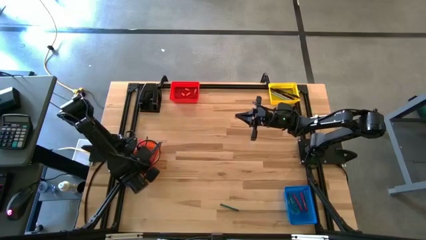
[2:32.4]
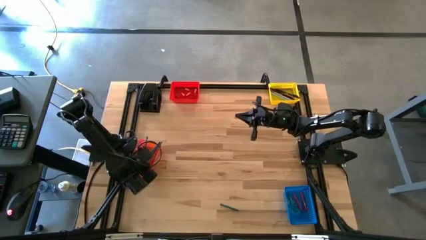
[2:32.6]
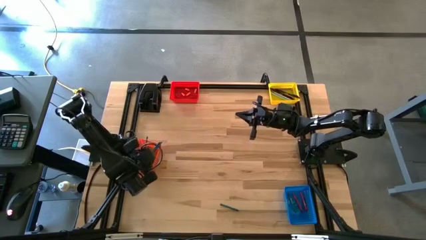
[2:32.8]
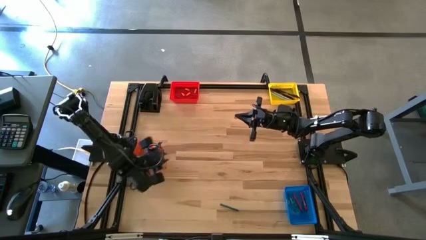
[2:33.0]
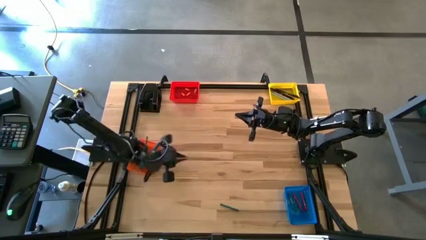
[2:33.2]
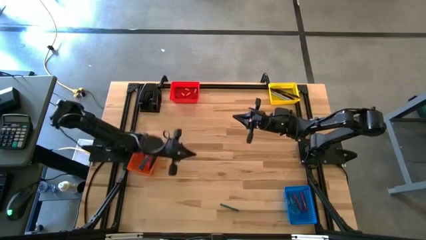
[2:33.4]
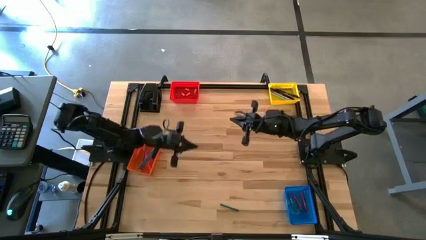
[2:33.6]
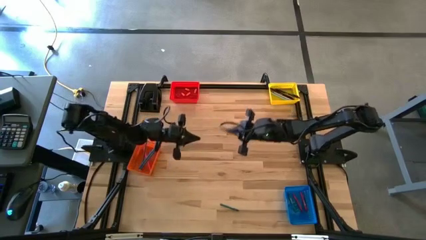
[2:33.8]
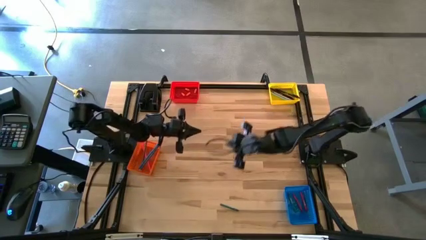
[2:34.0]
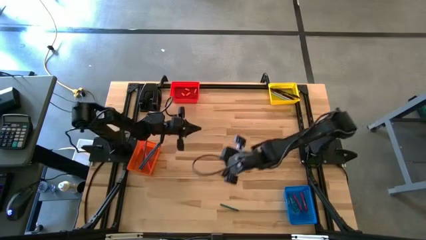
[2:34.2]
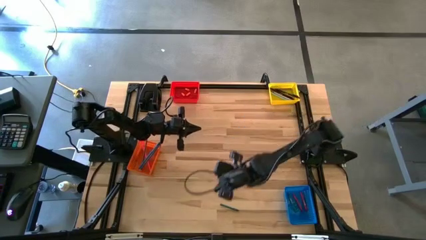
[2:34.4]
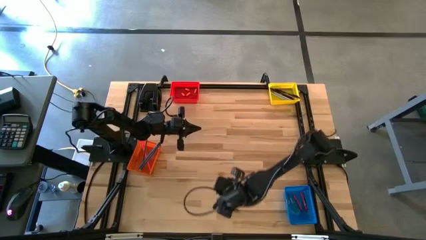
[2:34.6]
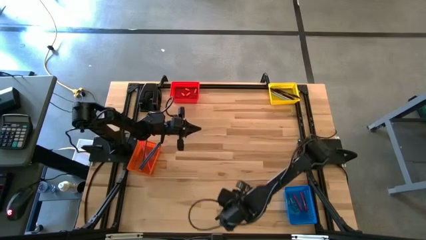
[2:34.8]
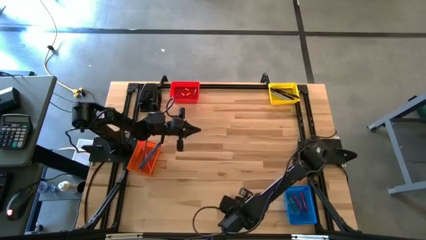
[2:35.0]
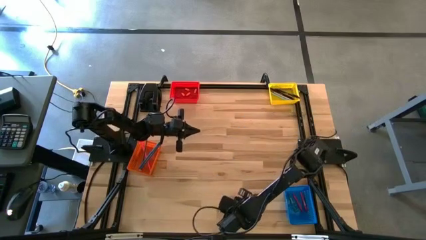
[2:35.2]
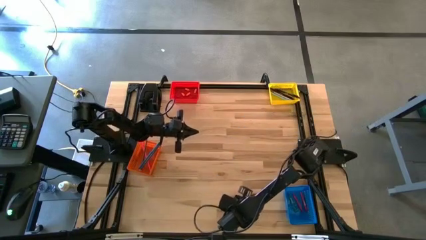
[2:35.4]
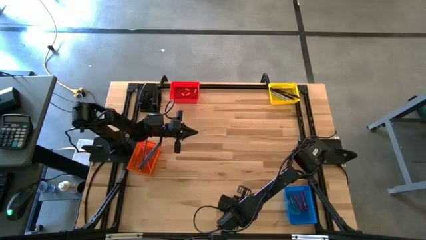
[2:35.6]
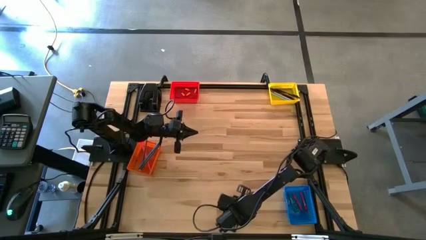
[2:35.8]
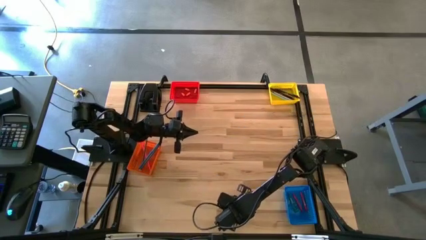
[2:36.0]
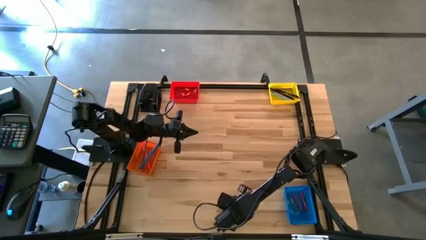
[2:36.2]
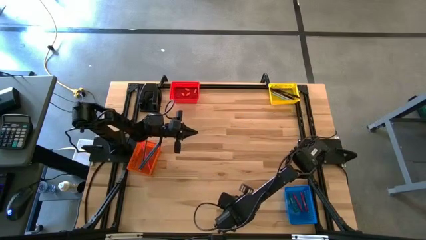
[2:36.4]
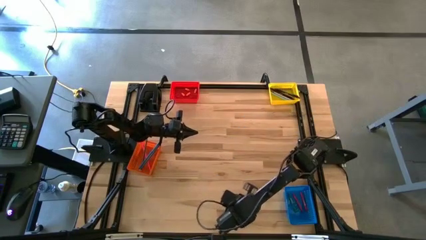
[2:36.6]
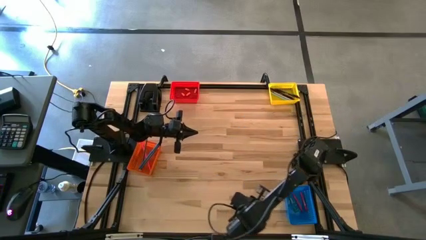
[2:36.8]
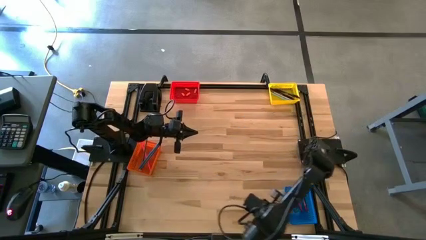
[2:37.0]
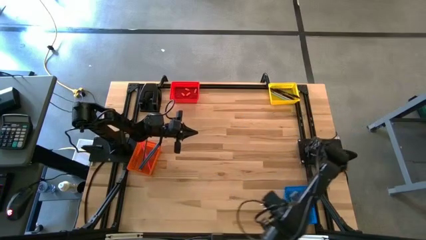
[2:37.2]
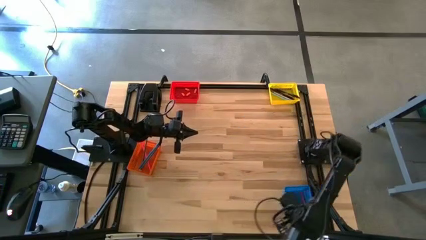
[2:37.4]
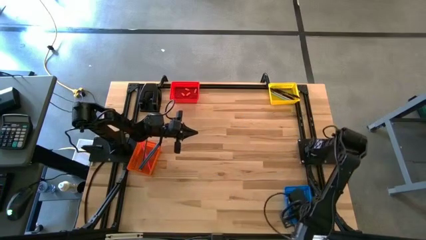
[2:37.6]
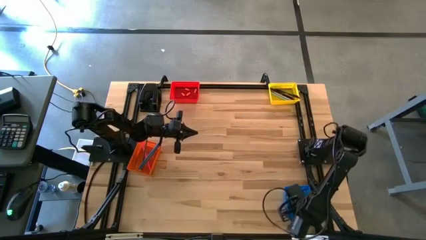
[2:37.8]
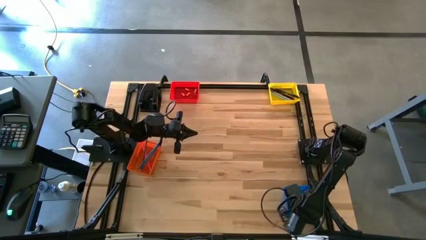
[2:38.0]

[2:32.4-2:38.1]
Task: Sort crayons/erasers/pens/pencils in bins
Put the green crayon into the blue basket

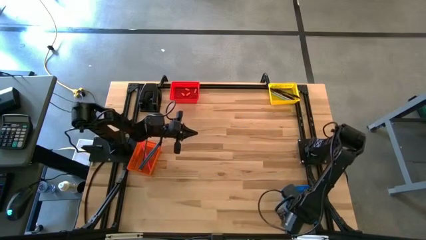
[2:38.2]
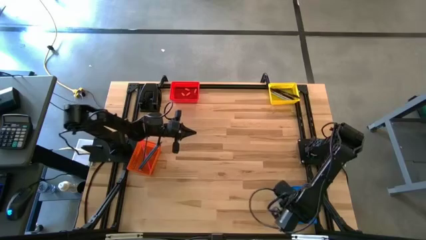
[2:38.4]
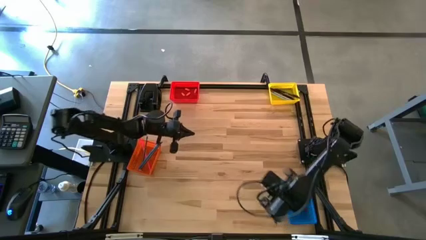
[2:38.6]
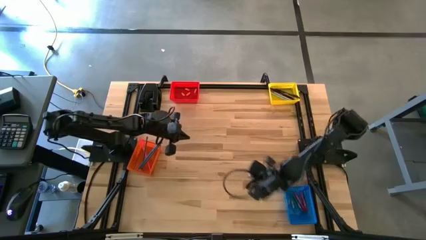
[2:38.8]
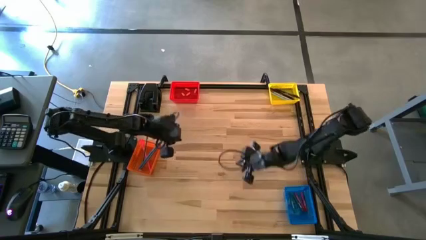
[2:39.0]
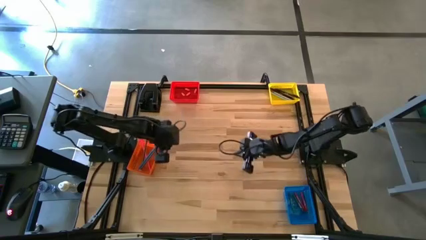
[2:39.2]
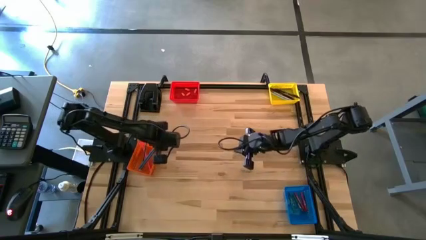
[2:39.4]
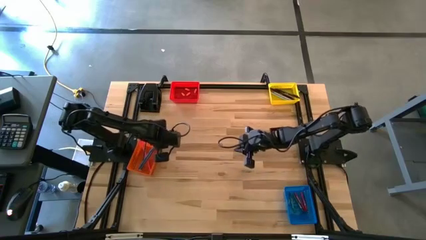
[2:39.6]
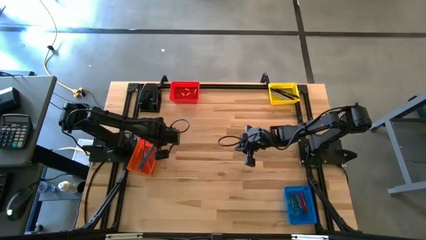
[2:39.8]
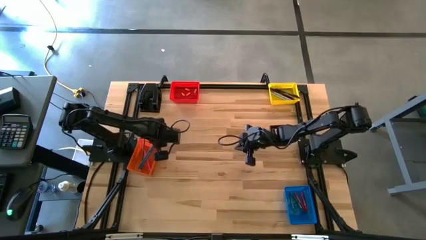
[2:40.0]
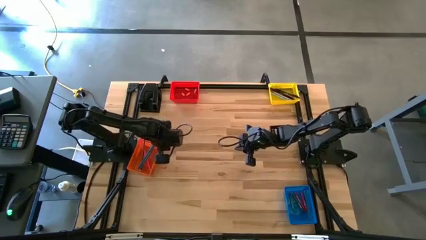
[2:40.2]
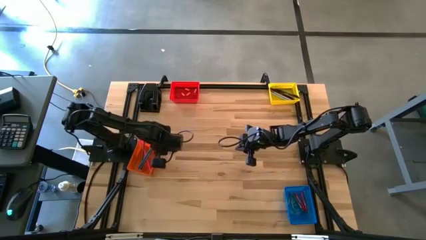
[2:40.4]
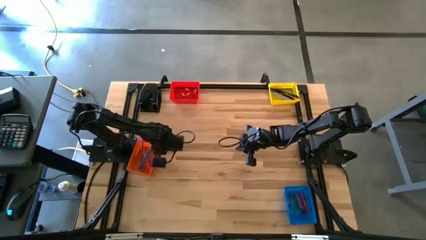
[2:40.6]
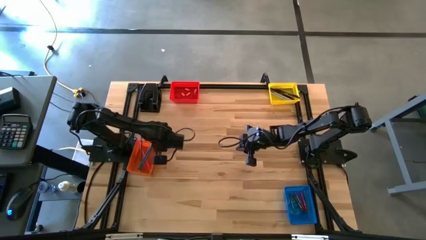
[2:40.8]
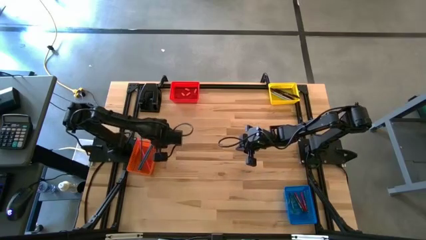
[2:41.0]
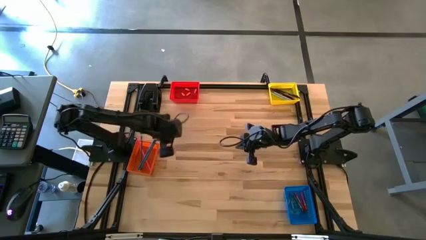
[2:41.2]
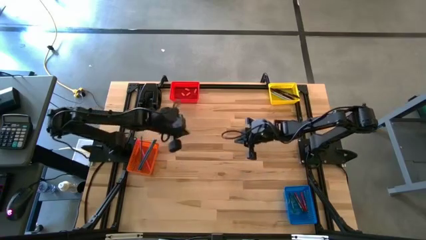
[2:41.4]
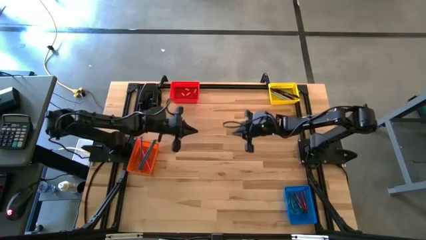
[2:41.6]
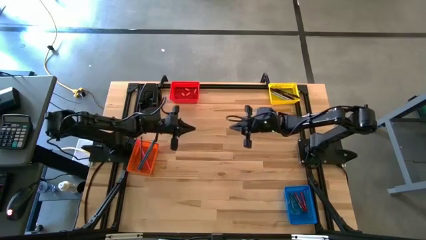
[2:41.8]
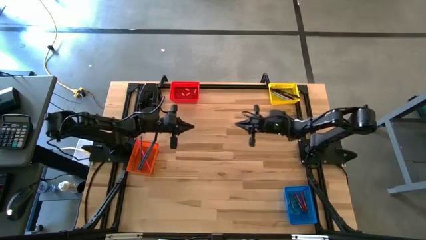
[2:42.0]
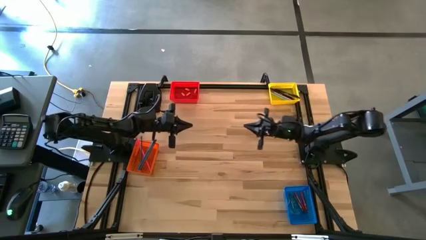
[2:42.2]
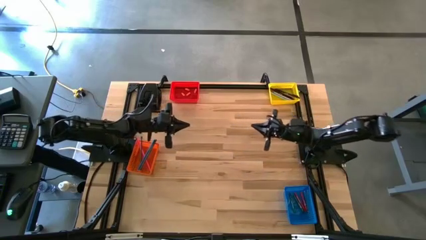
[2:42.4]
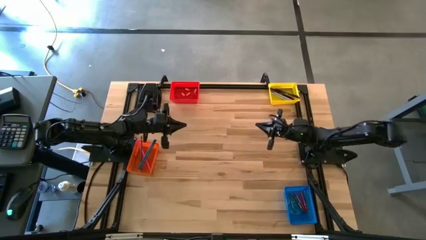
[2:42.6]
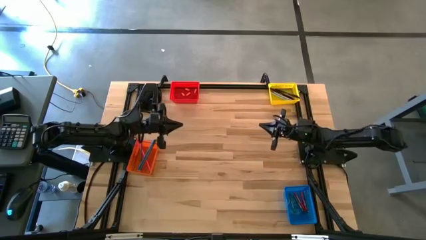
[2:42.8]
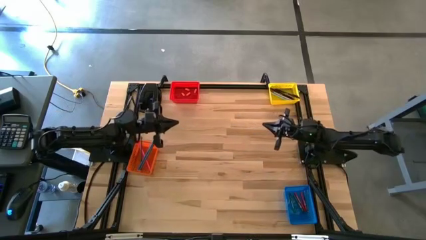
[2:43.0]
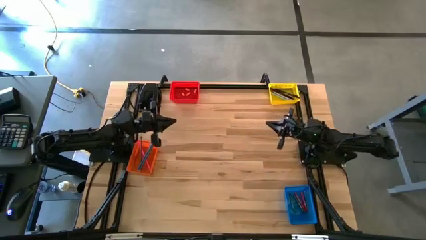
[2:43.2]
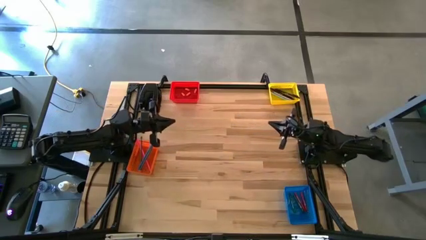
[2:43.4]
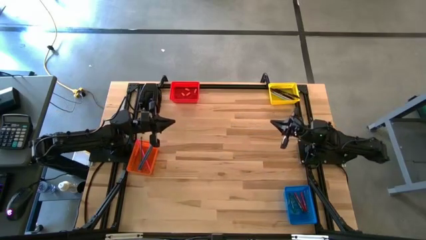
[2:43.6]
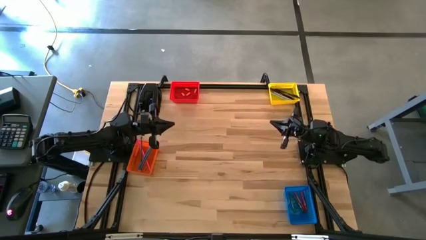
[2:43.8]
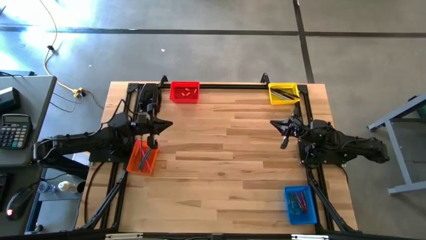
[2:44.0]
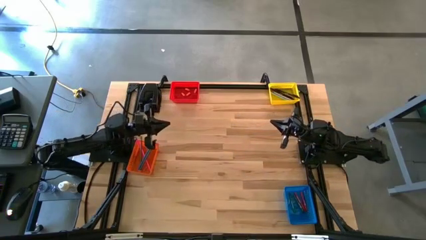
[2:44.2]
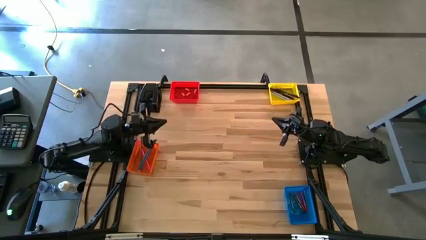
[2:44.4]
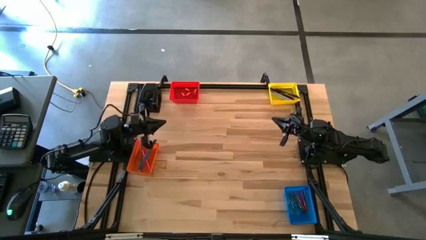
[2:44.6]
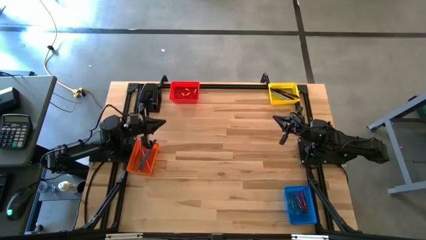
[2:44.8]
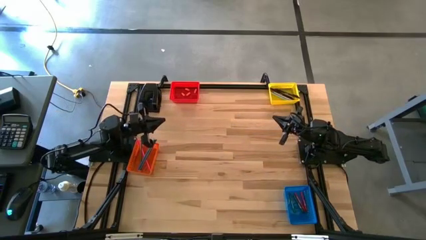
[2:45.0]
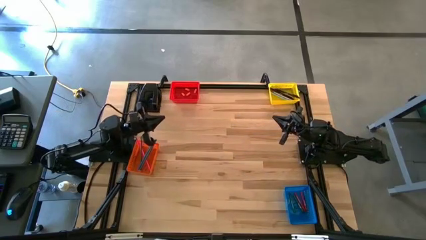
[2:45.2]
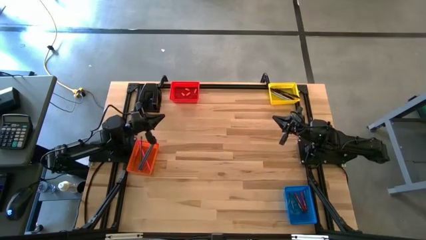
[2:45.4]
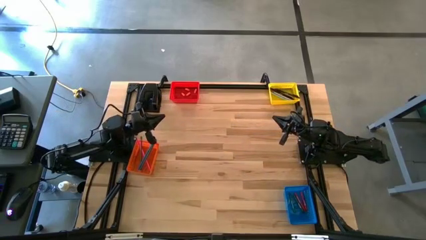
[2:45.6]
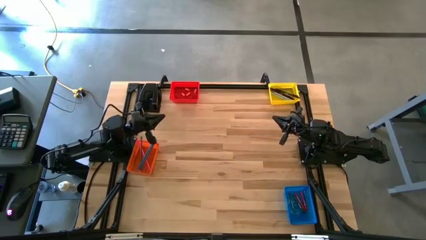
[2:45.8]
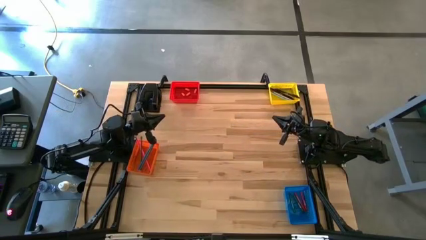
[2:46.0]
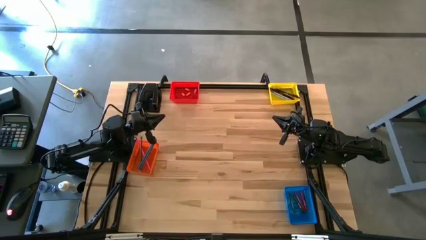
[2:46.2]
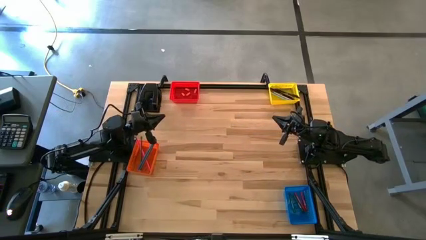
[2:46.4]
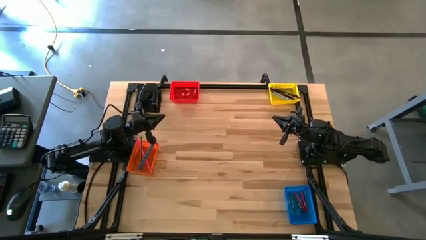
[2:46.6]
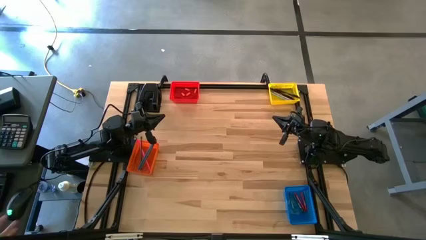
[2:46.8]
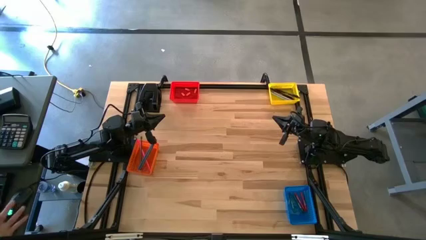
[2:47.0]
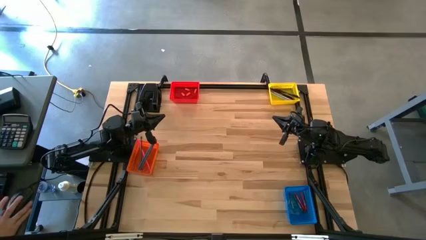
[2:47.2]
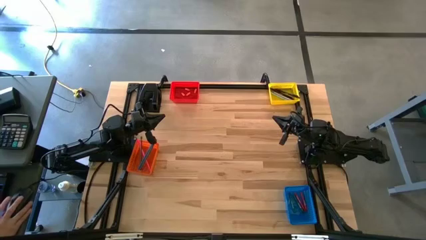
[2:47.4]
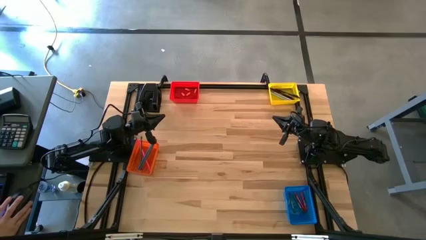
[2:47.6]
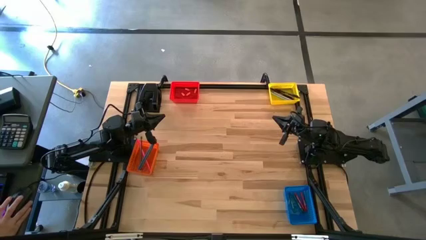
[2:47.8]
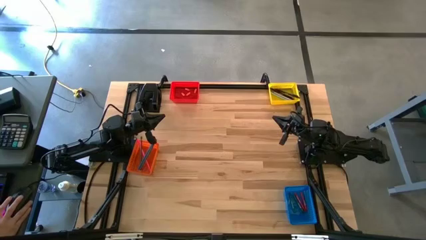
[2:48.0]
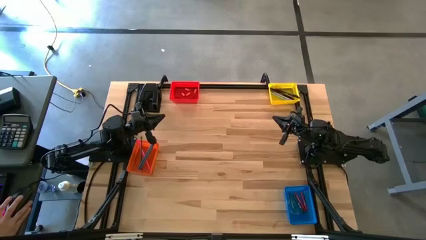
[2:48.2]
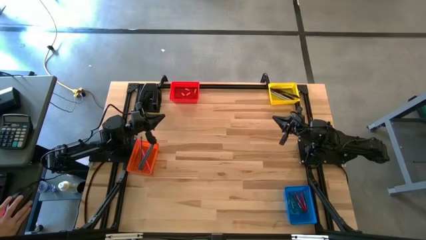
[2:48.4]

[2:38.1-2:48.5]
Return to Home Position
